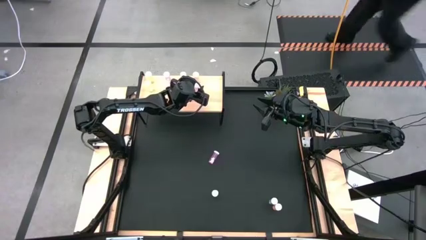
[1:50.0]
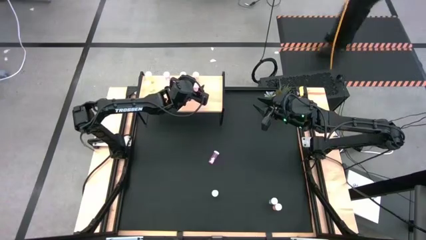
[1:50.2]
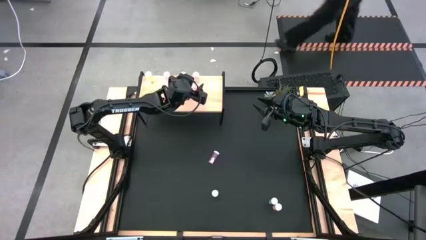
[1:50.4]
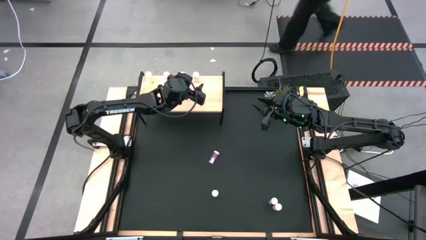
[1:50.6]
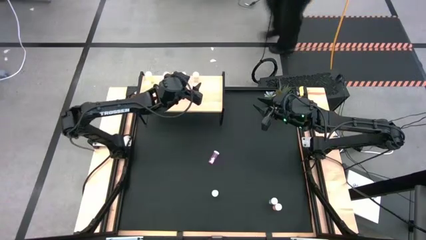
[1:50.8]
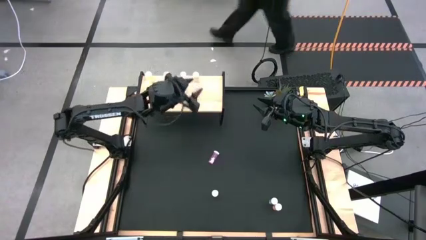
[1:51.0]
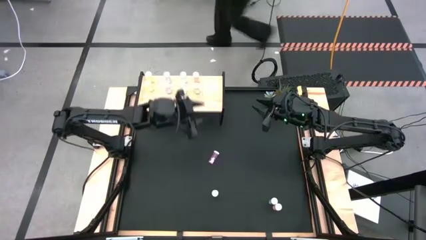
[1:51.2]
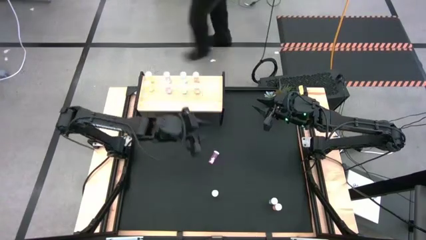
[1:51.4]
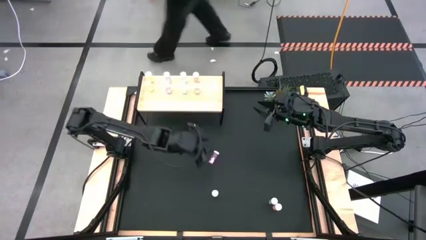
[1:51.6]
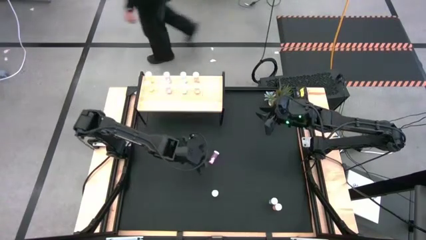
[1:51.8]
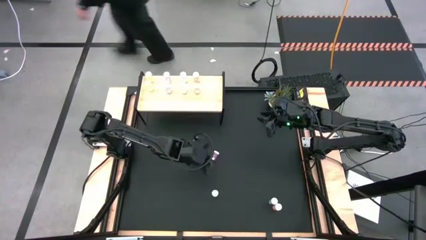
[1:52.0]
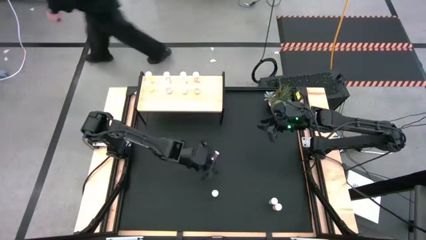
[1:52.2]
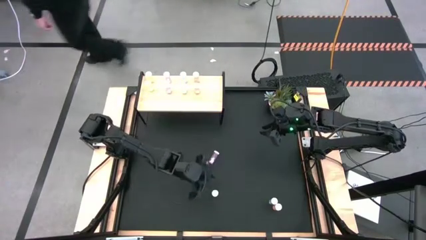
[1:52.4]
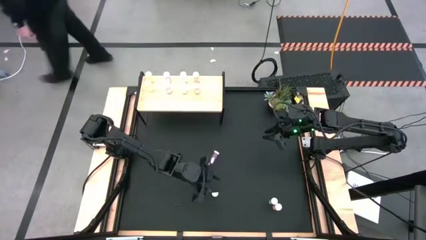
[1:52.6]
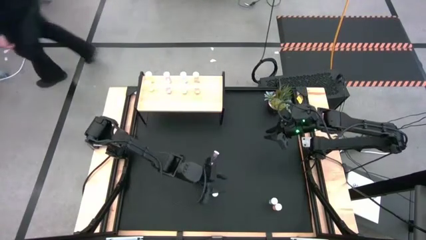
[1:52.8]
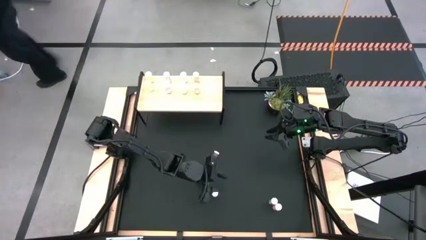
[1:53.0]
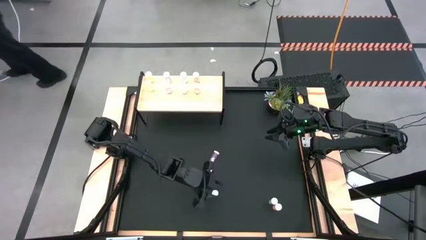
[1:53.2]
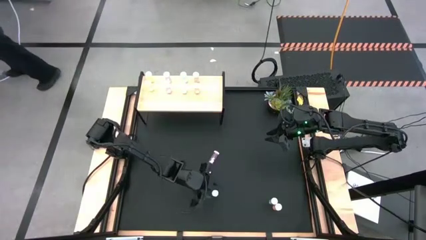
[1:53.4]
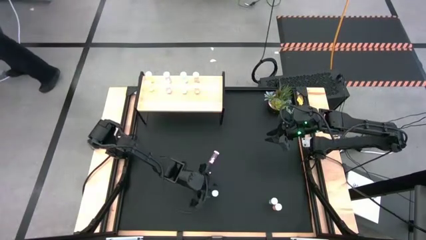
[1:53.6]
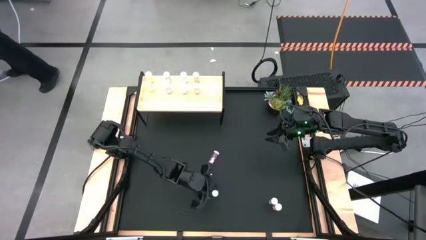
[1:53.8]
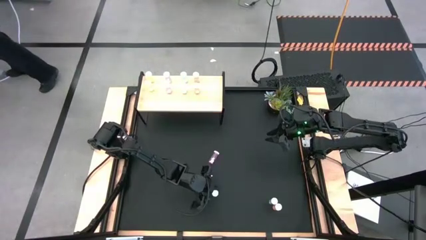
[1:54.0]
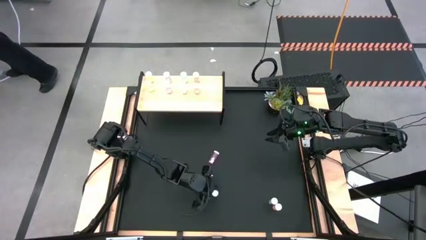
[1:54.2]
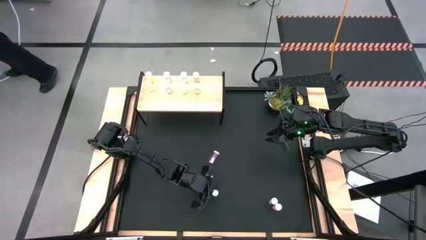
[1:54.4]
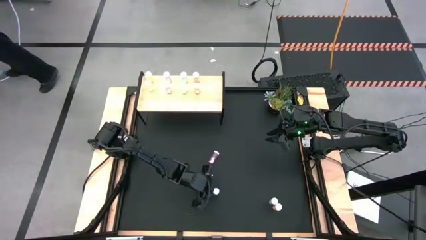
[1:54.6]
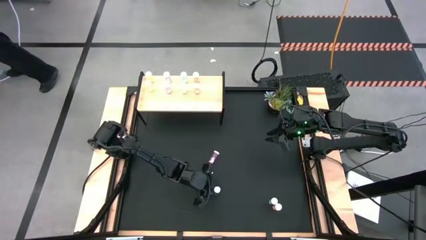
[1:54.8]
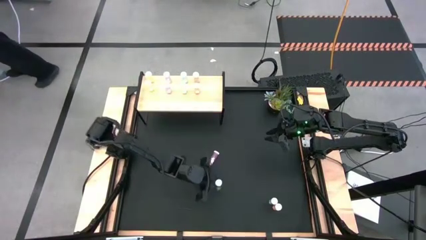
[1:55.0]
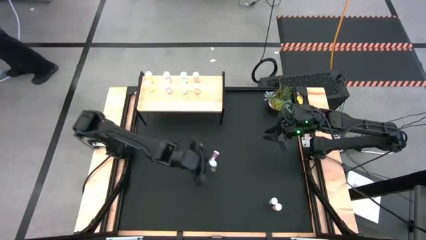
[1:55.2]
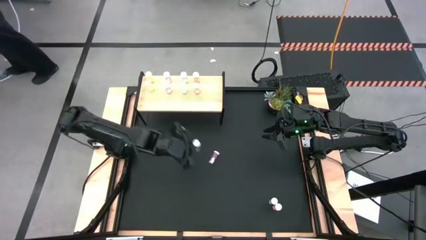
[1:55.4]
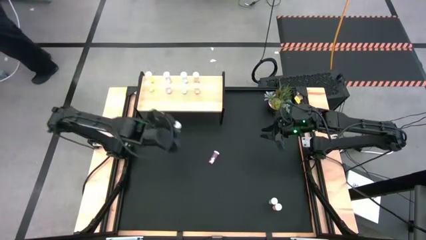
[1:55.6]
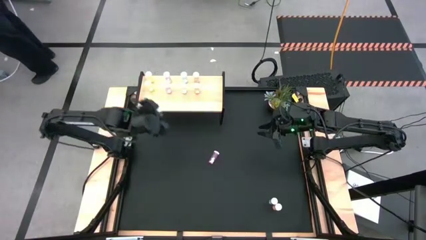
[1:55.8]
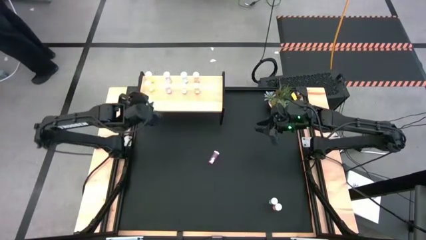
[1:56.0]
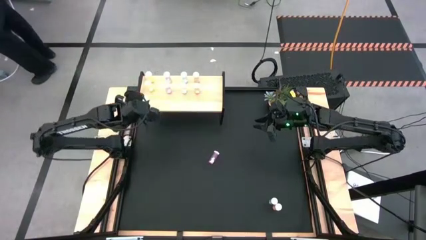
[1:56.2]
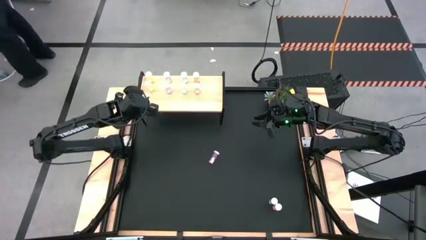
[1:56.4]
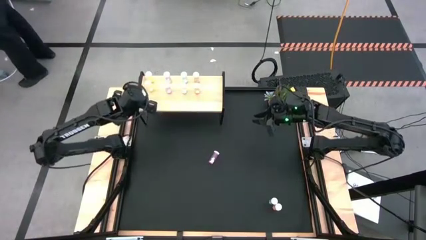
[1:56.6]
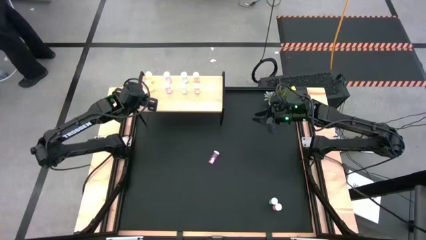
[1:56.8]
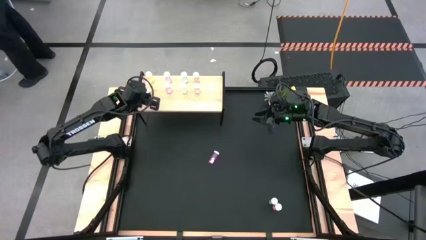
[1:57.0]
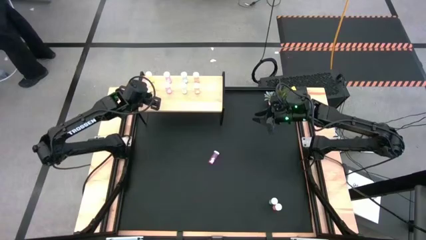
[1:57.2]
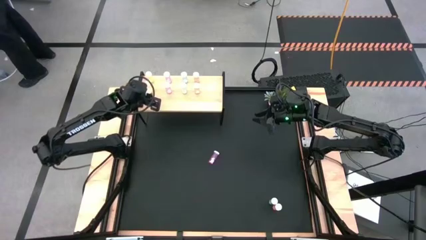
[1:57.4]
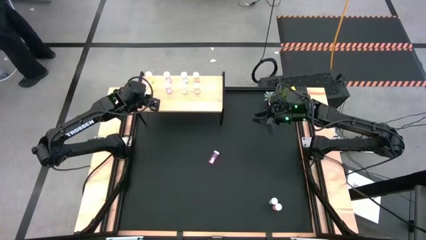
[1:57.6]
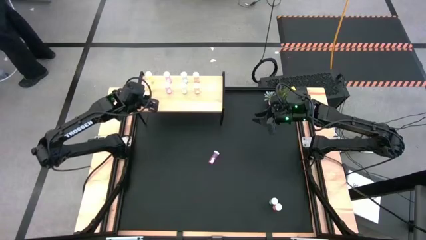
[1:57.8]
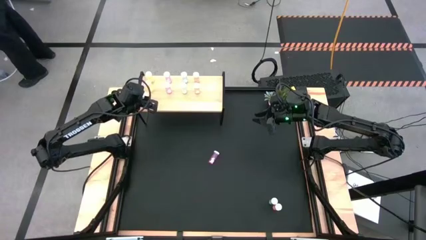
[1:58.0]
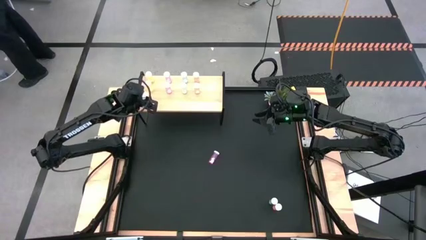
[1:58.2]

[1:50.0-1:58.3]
Task: Pick and place medicine bottles onto shelf by color
Put the yellow medicine bottle aligned with the other yellow medicine bottle on the shelf

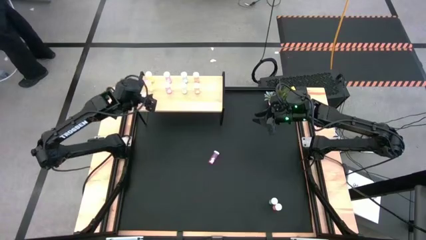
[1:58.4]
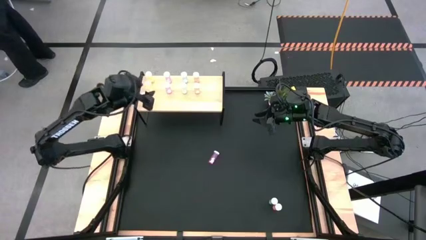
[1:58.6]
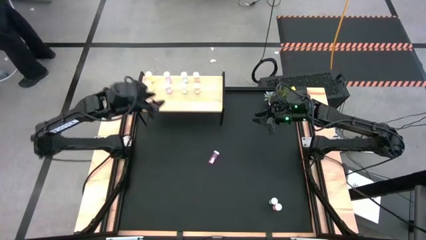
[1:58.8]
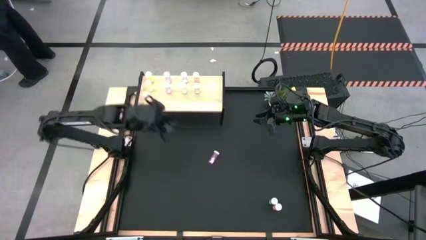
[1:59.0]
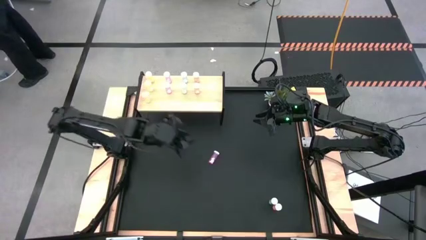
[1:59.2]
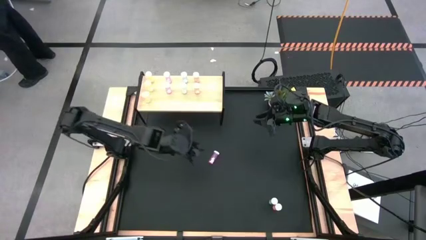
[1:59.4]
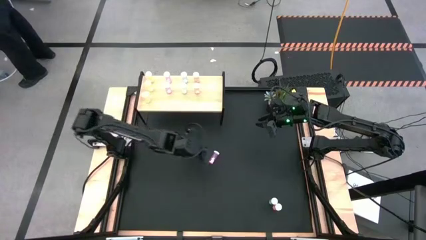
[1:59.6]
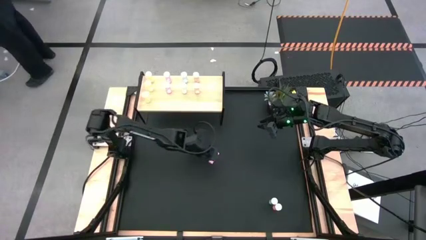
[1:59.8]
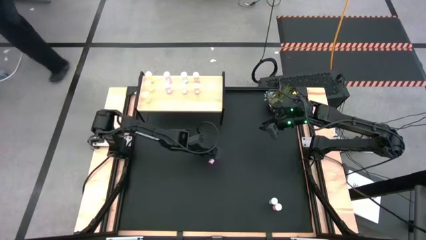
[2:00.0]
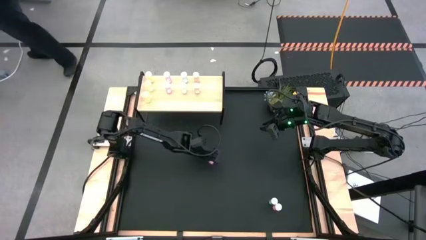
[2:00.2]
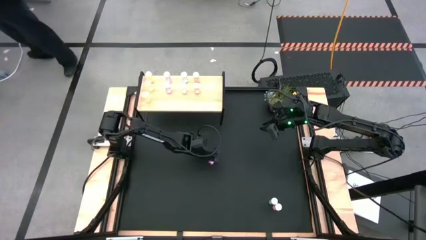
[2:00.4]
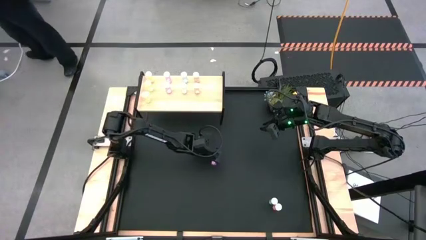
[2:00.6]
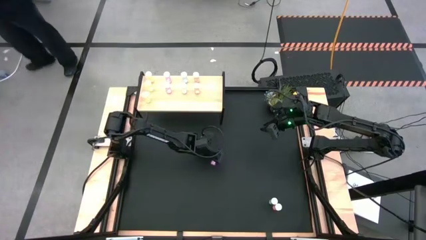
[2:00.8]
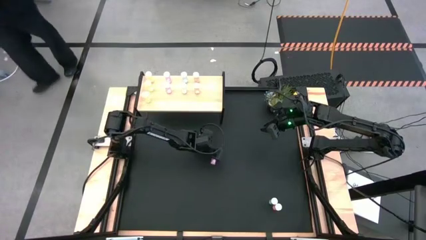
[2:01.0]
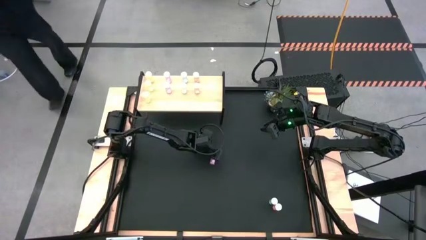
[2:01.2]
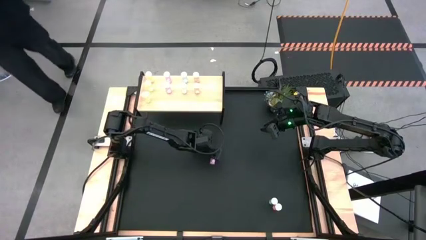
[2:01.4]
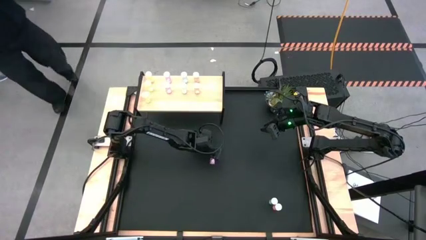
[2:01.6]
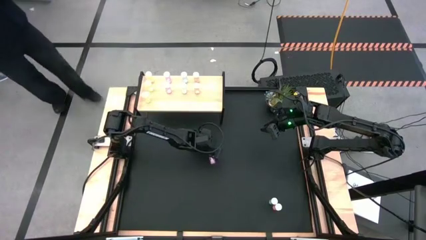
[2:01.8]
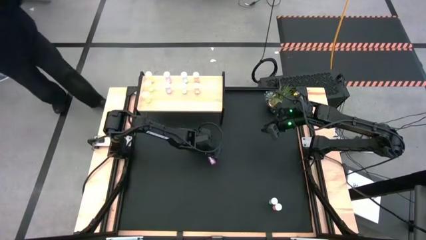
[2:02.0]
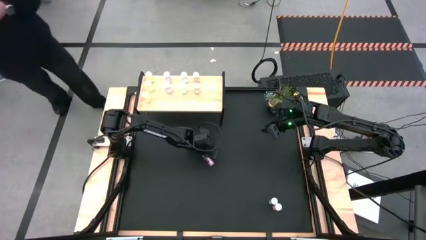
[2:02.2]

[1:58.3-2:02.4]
Put the pink medicine bottle aligned with the other pink medicine bottle on the shelf

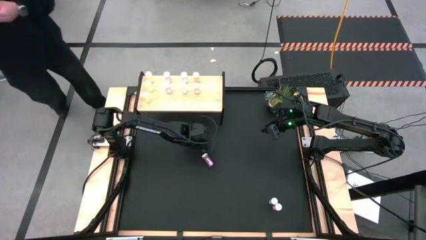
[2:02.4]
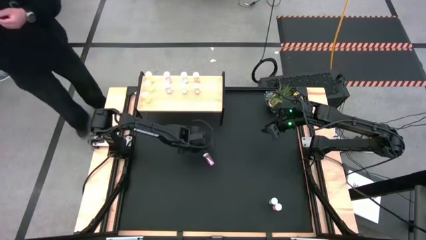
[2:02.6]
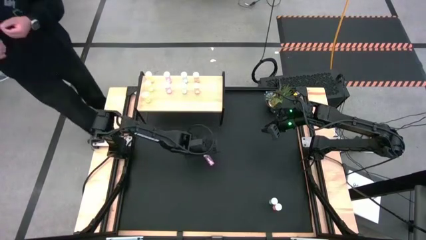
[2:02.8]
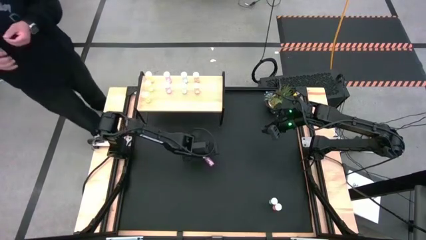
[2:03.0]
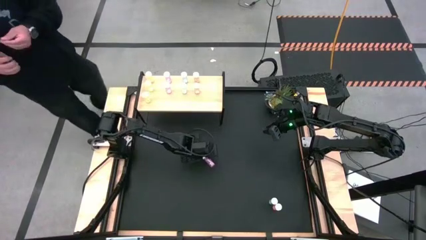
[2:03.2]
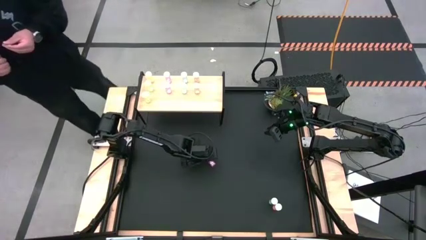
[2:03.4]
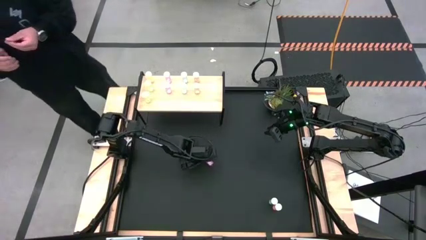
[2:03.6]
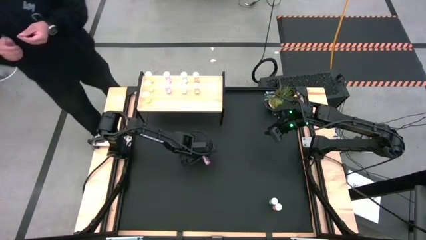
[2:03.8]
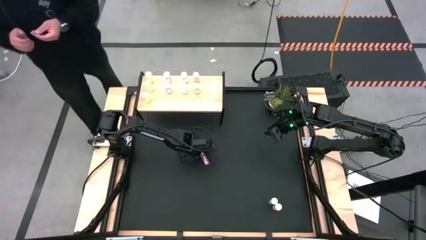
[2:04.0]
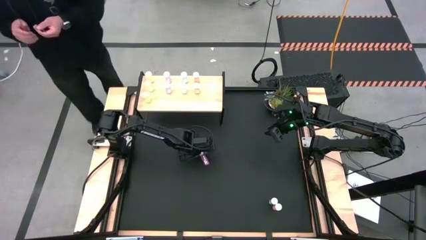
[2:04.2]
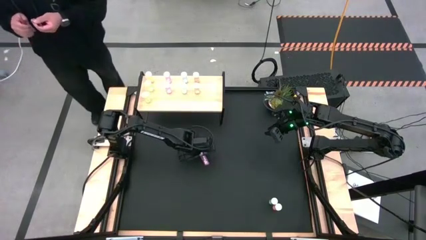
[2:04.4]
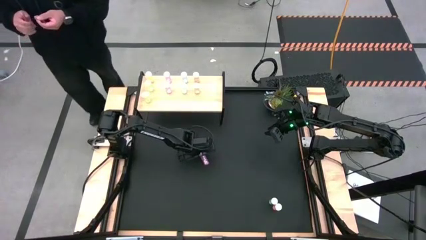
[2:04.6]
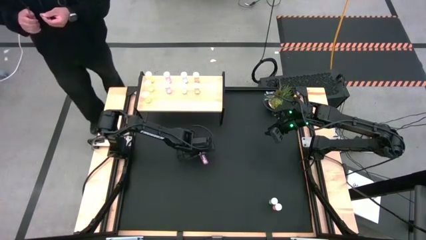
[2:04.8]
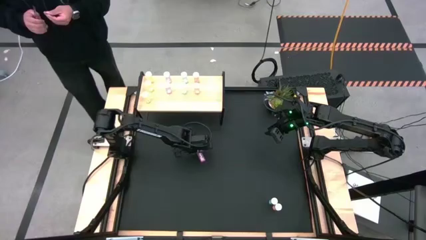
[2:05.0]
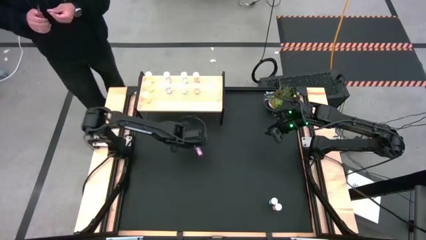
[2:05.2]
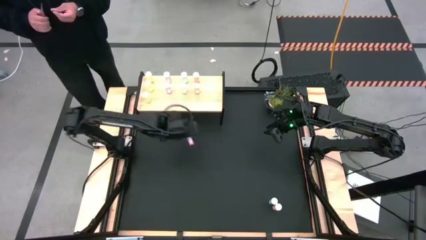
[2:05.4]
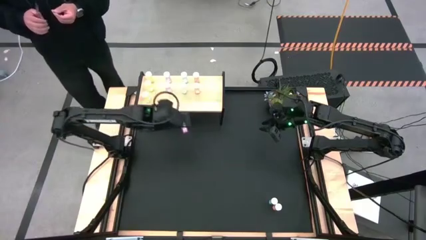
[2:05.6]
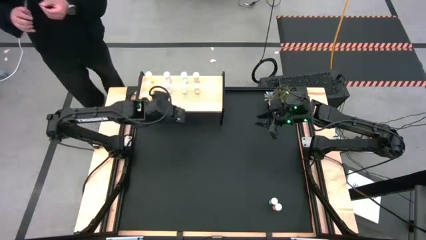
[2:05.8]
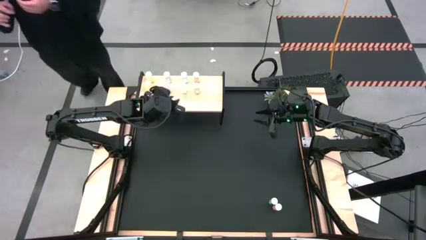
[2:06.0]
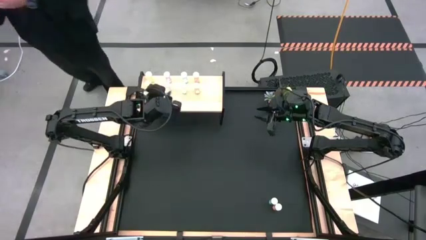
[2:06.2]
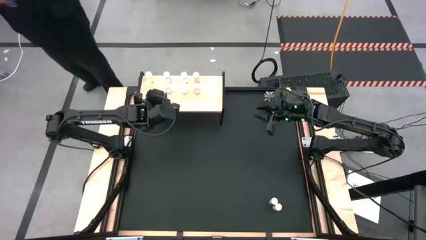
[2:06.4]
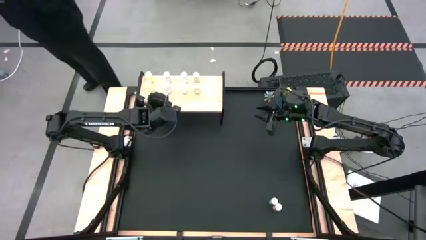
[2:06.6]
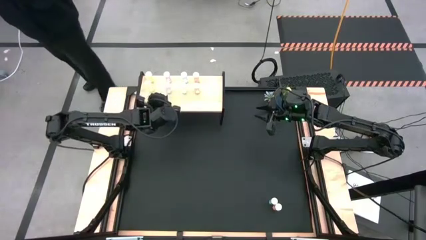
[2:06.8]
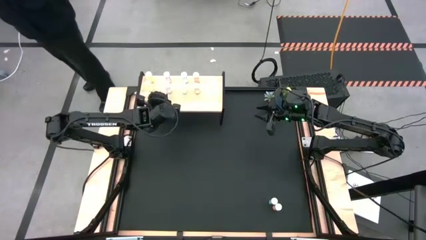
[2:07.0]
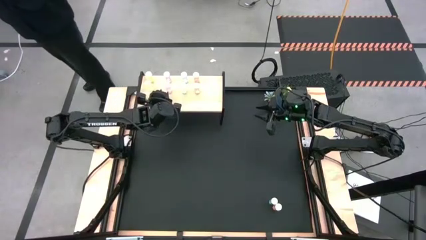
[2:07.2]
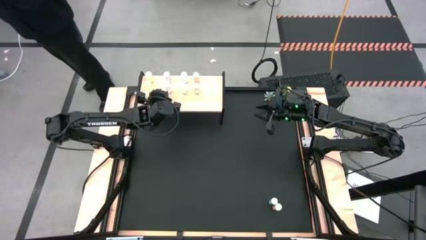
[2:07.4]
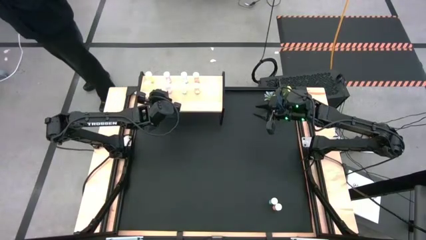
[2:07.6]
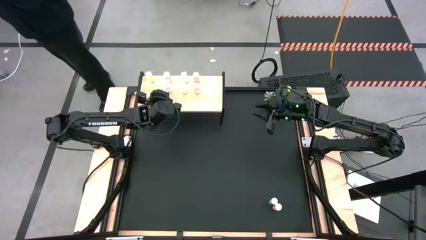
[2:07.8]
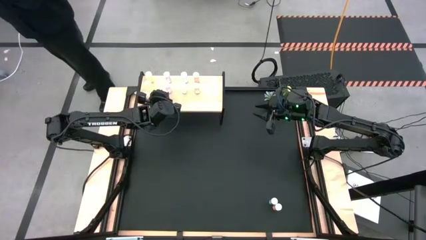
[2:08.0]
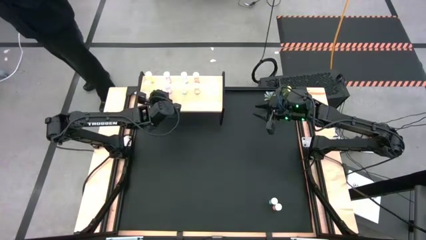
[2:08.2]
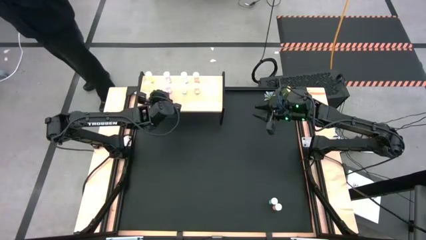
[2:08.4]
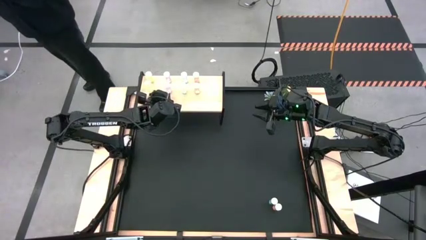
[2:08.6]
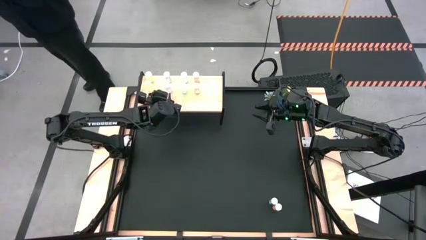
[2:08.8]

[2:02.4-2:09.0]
Put the pink medicine bottle aligned with the other pink medicine bottle on the shelf
